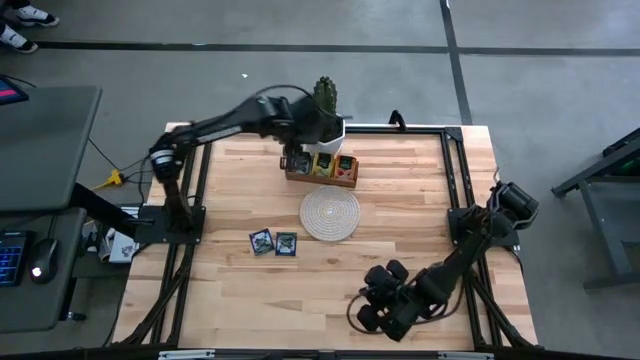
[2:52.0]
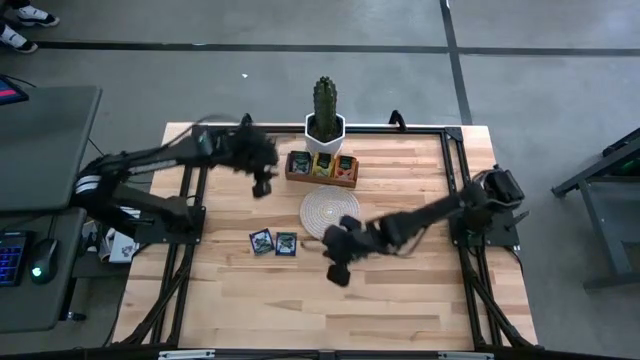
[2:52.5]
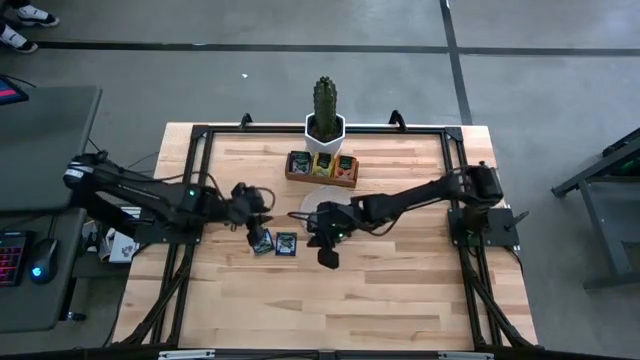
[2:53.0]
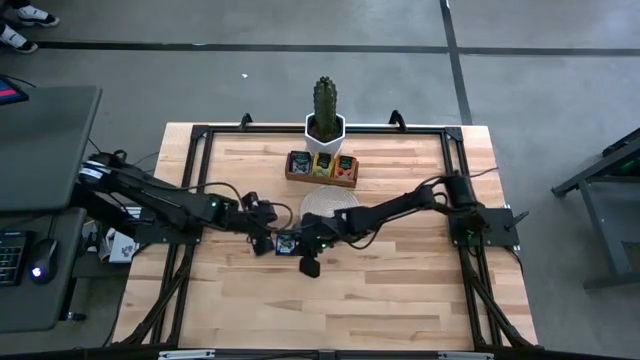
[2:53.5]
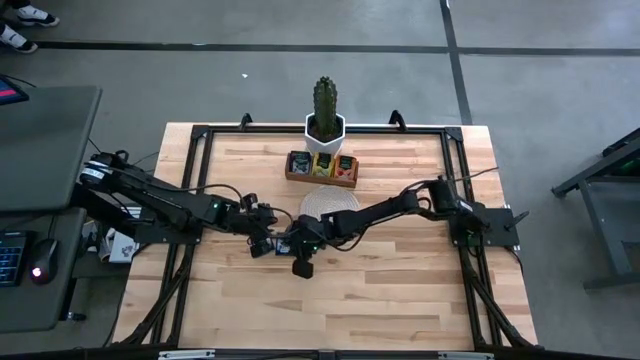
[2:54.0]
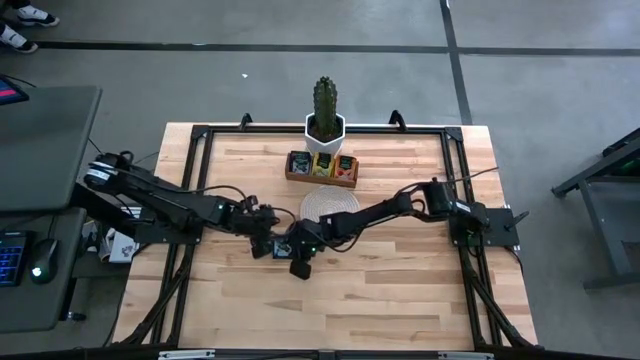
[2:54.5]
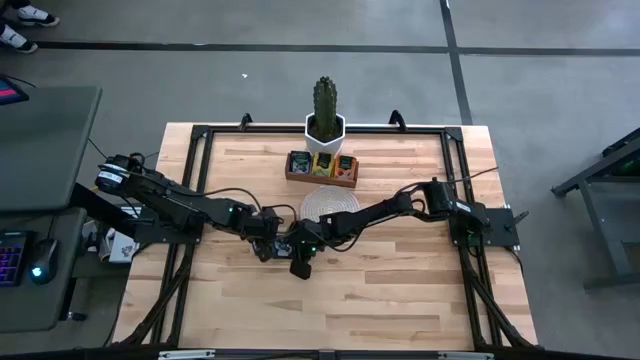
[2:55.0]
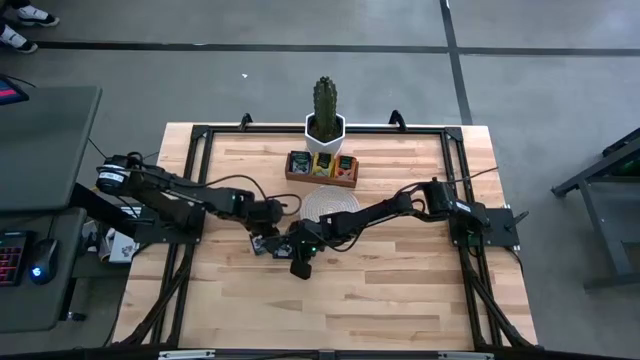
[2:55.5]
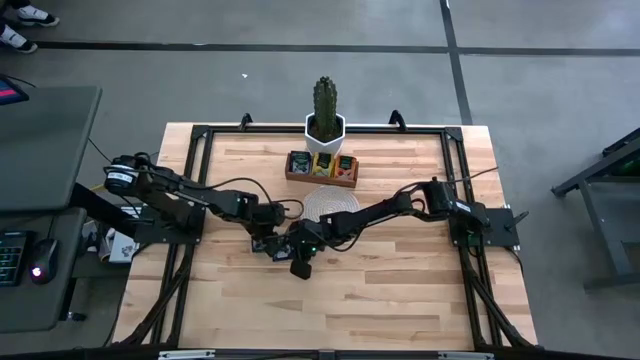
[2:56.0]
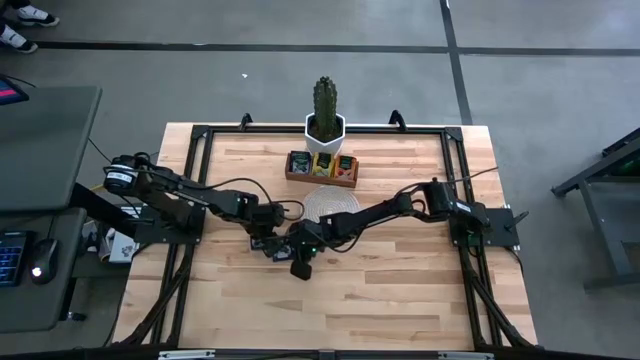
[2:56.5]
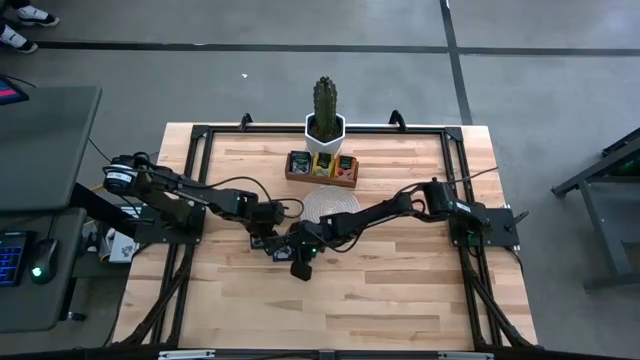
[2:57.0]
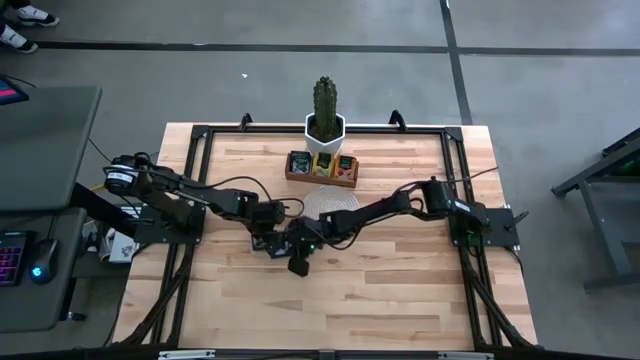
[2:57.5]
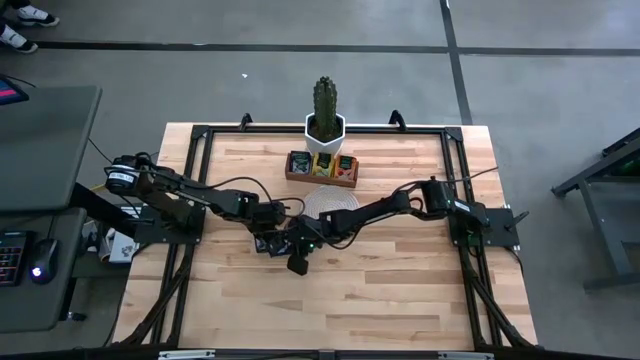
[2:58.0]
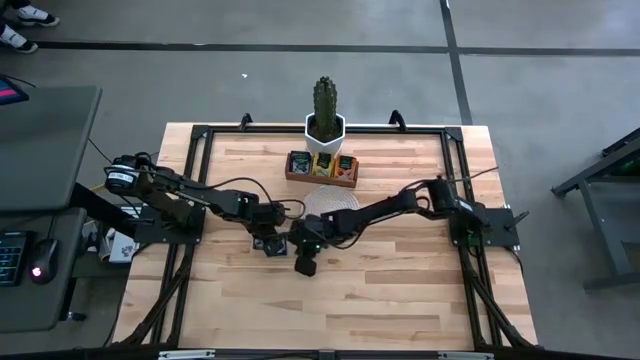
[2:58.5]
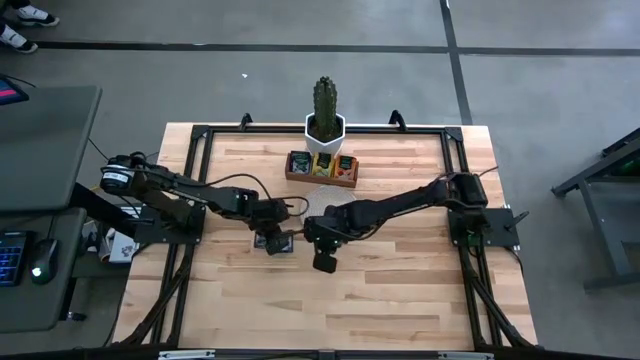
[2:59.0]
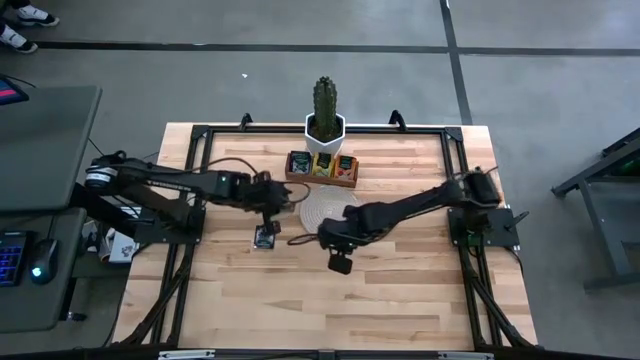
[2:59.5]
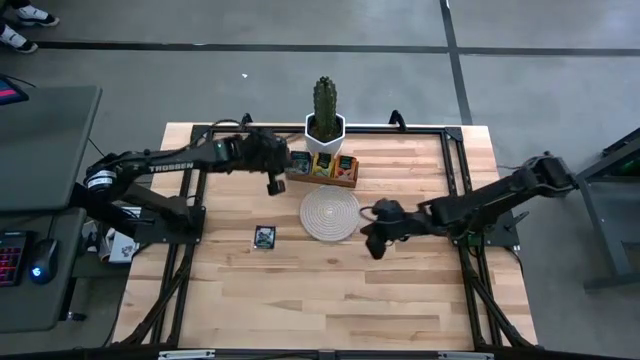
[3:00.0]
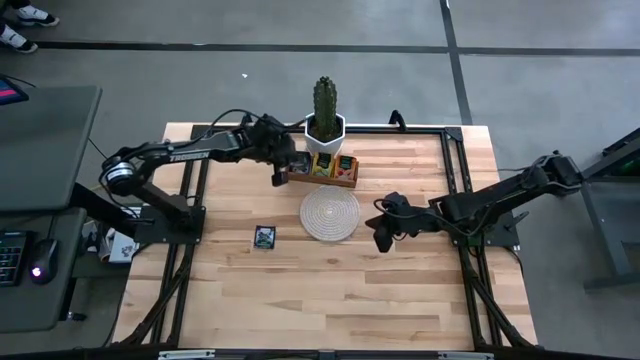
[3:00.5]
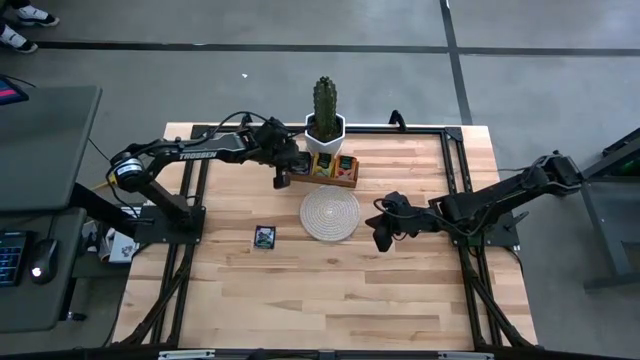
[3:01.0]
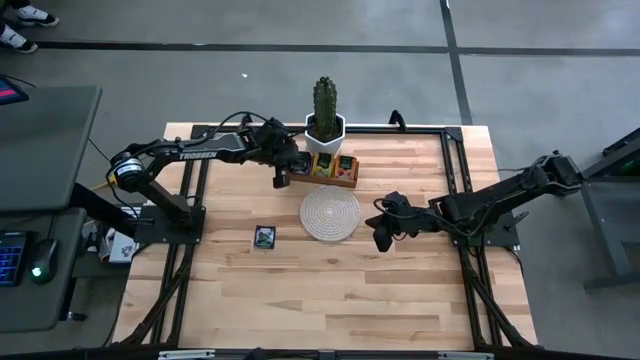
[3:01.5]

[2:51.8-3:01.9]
Task: Pick & Place Tea
Put the purple tea bag into the left section of the wooden organizer

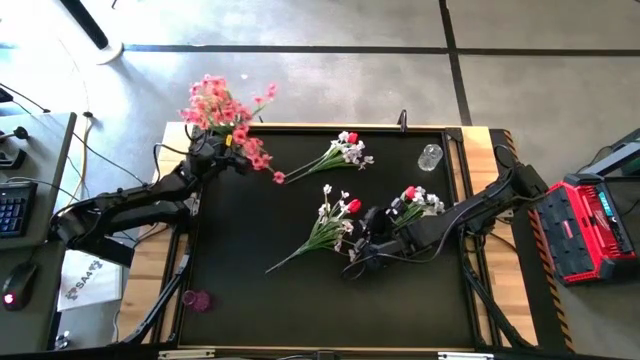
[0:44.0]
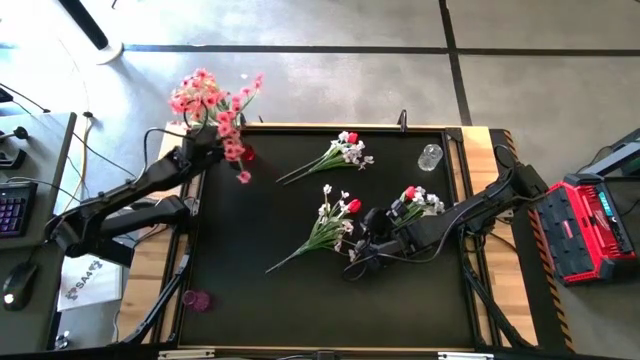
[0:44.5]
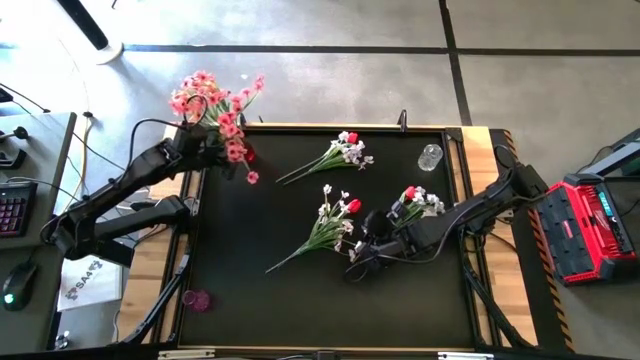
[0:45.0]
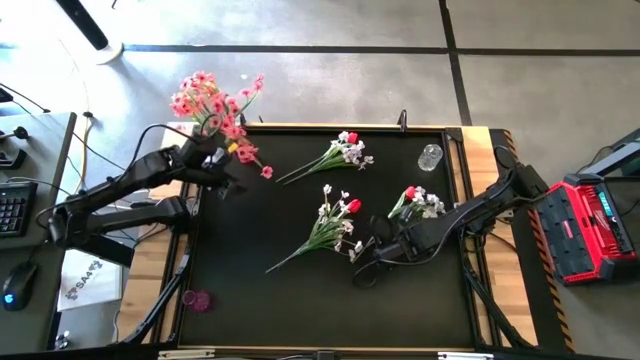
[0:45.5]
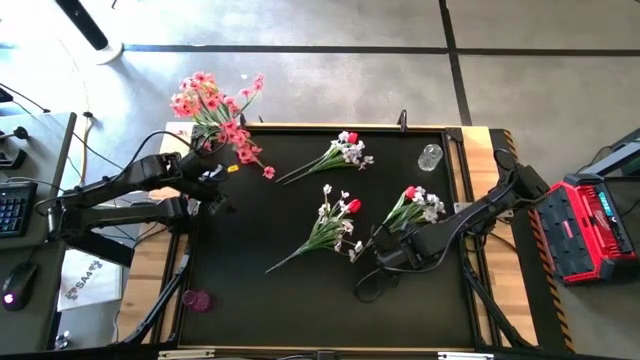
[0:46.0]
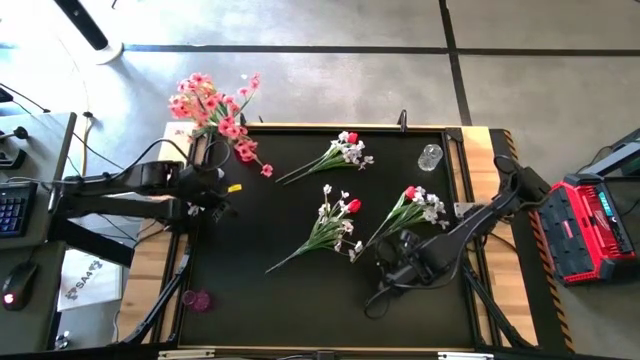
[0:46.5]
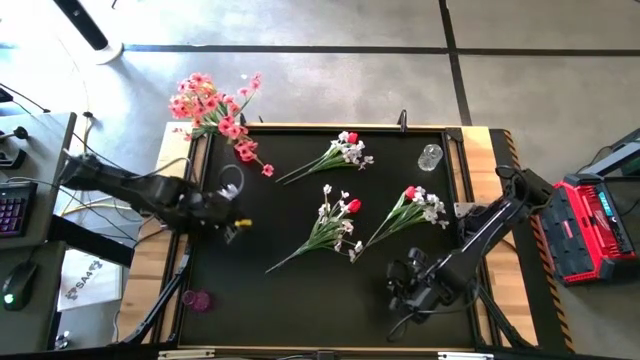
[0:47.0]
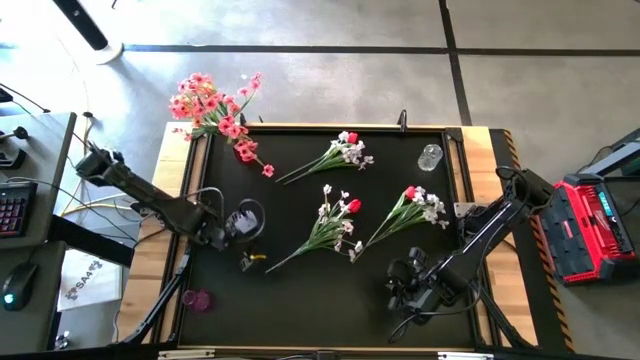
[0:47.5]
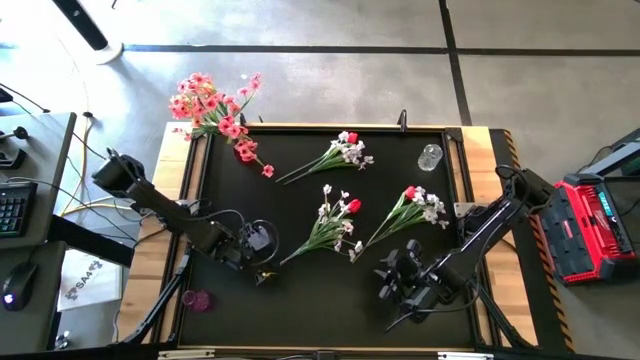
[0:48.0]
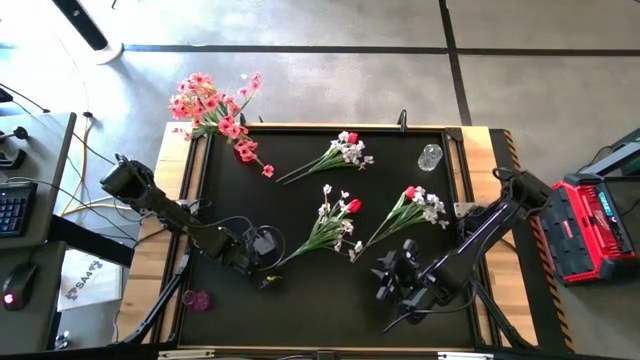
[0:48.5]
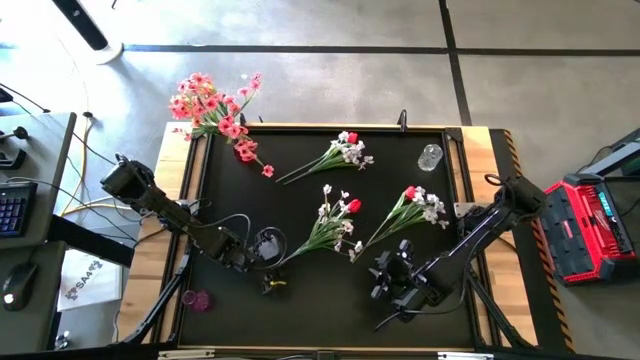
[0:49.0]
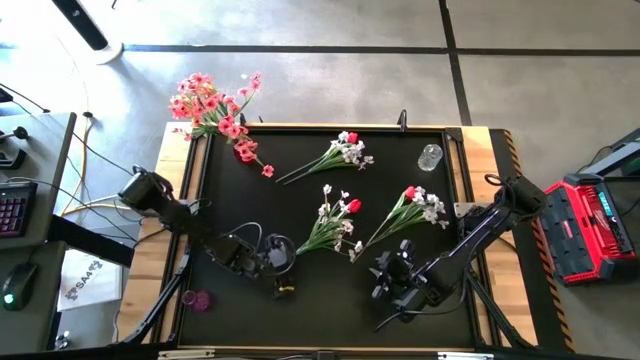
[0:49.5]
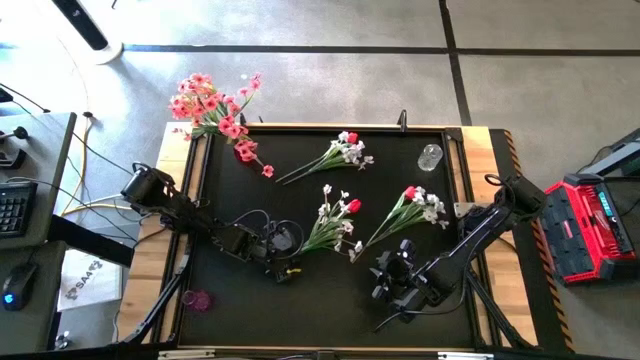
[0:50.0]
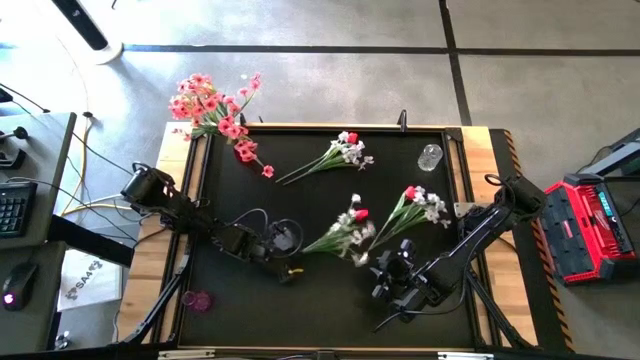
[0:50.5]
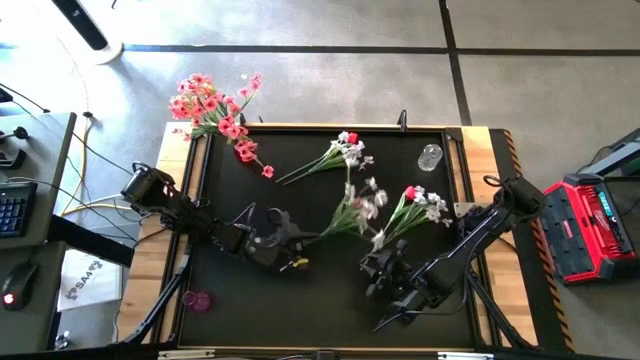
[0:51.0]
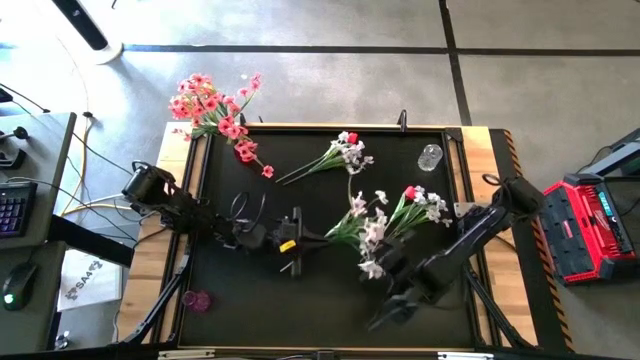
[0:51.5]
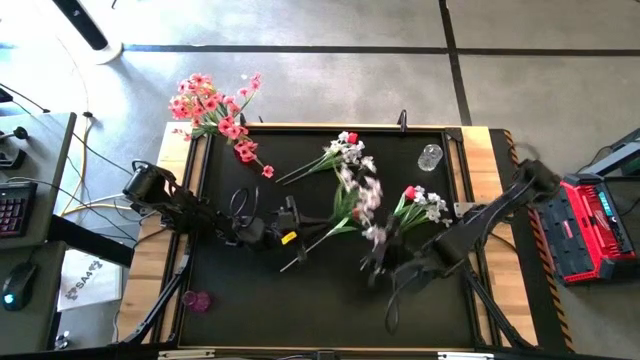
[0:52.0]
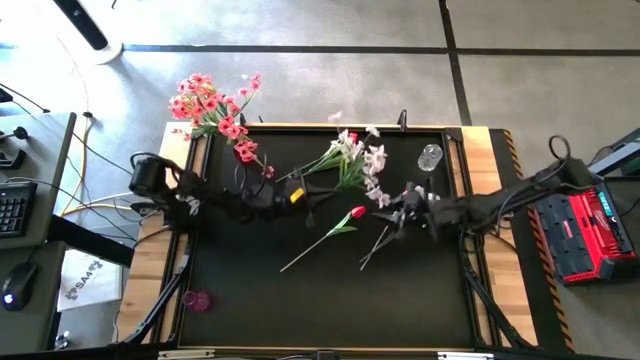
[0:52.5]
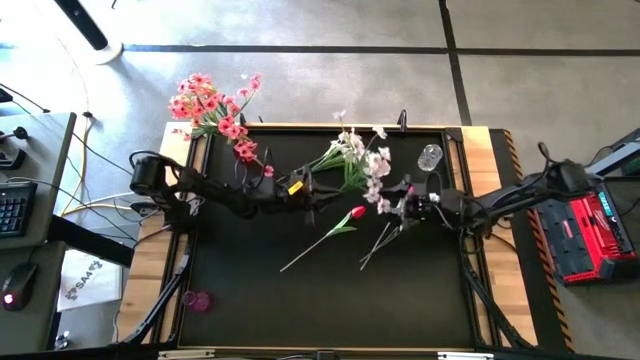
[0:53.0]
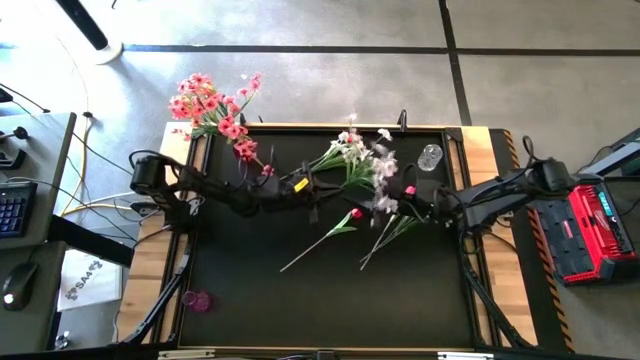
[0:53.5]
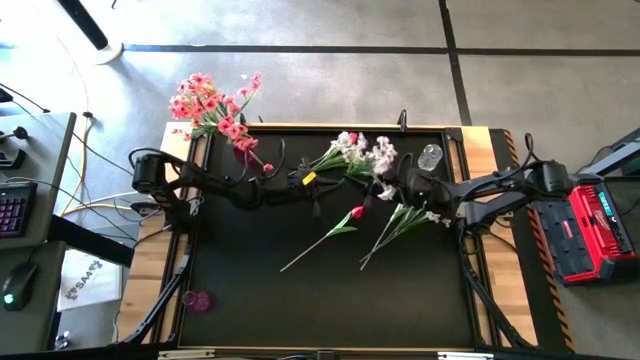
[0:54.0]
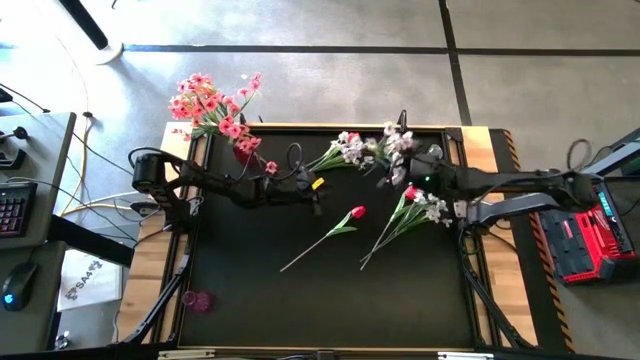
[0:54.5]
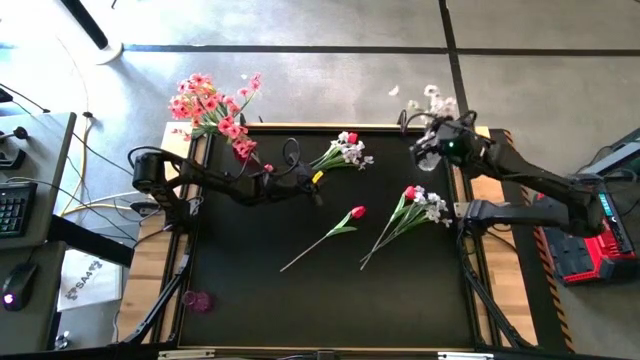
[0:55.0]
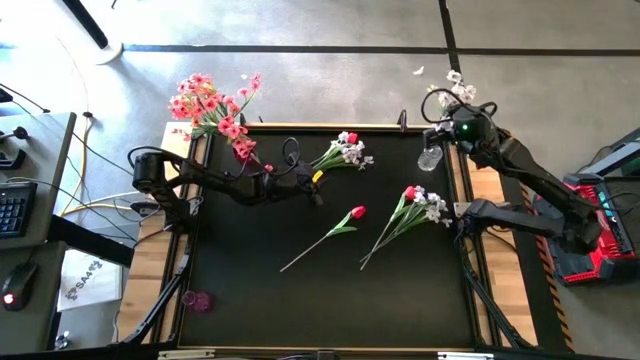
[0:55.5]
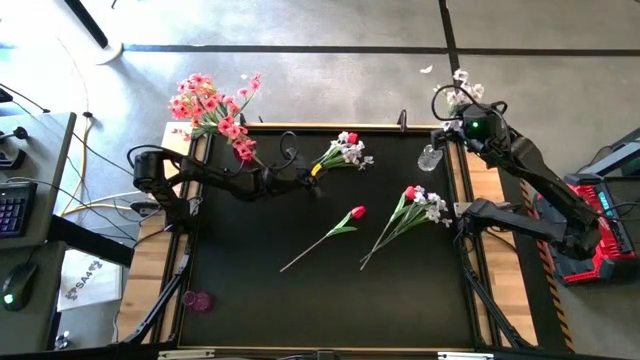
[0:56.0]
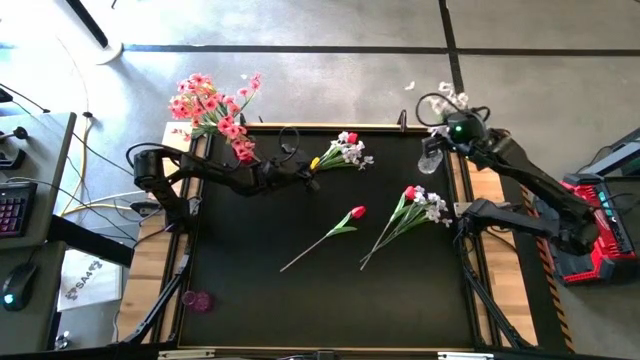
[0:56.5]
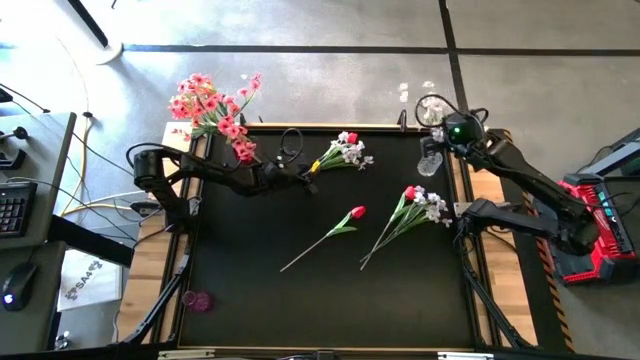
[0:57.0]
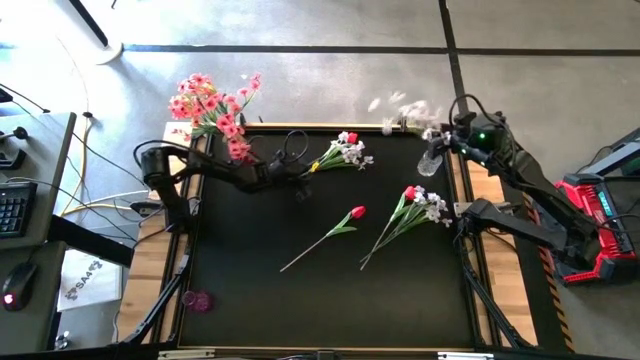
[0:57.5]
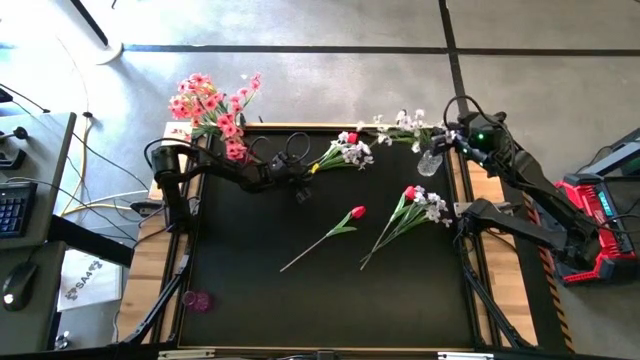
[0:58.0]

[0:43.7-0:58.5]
Task: Sort flowers into vase by color
Put the center white flower into the transparent vase
